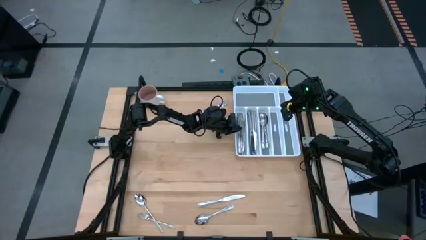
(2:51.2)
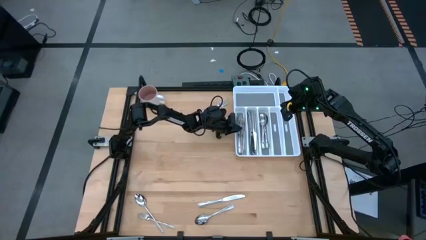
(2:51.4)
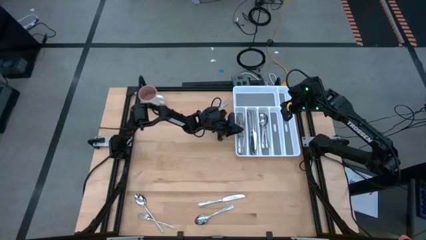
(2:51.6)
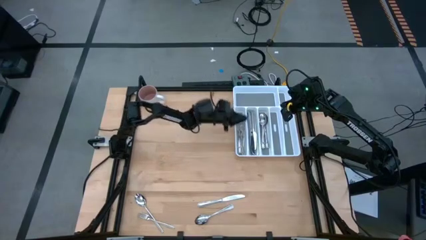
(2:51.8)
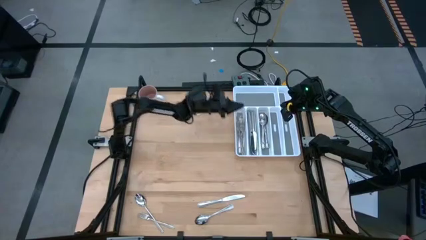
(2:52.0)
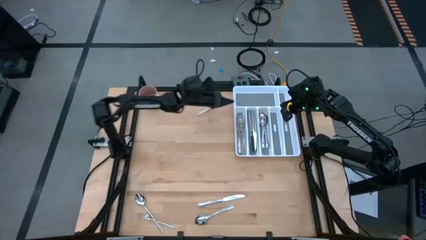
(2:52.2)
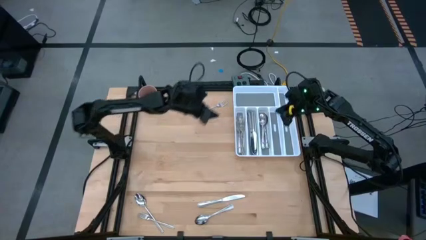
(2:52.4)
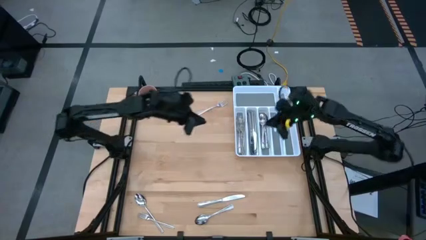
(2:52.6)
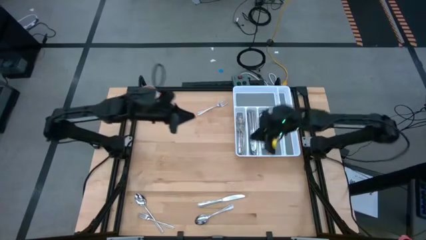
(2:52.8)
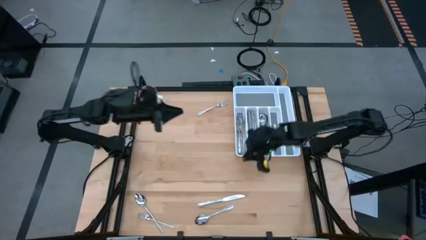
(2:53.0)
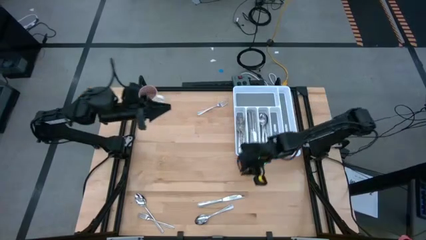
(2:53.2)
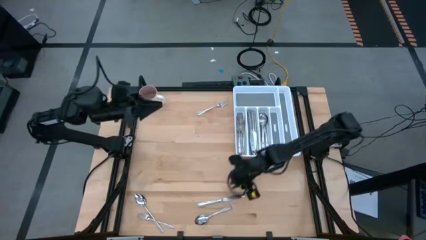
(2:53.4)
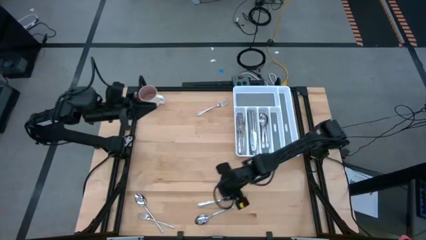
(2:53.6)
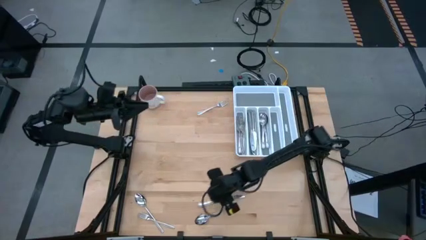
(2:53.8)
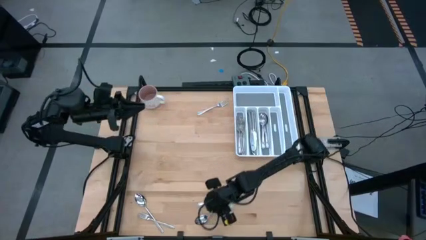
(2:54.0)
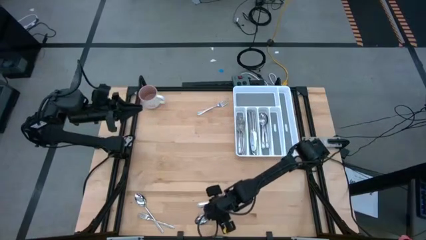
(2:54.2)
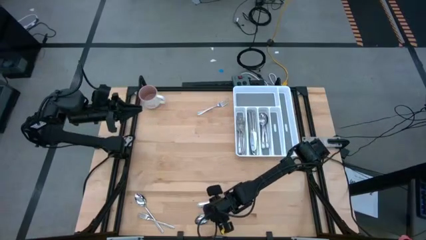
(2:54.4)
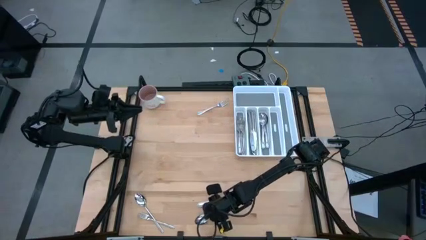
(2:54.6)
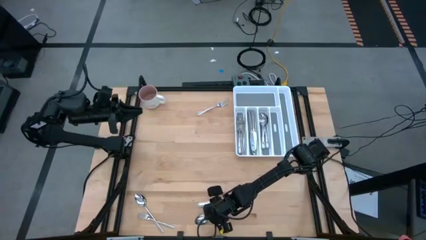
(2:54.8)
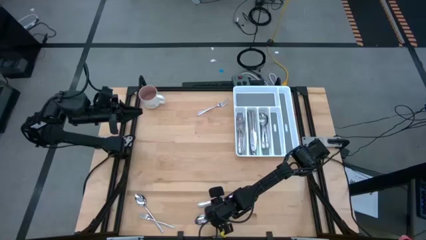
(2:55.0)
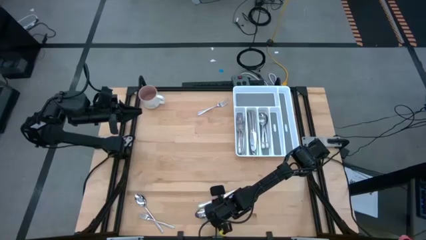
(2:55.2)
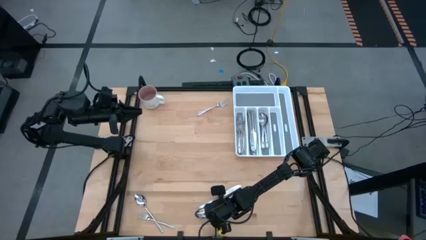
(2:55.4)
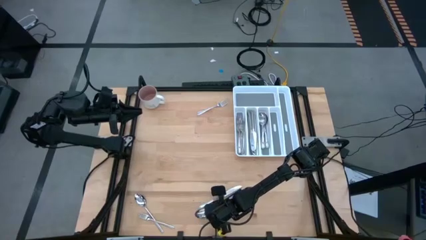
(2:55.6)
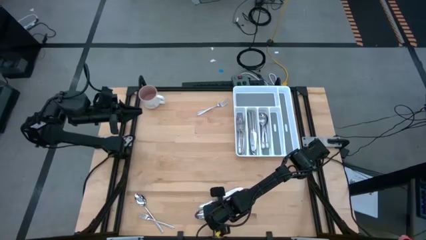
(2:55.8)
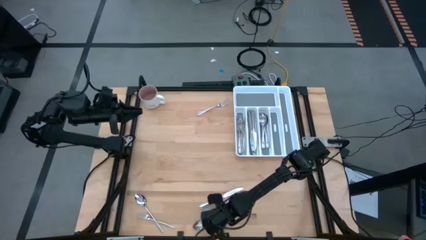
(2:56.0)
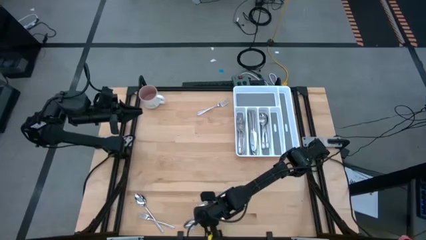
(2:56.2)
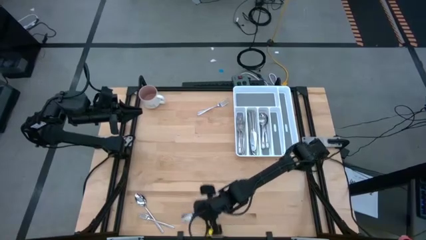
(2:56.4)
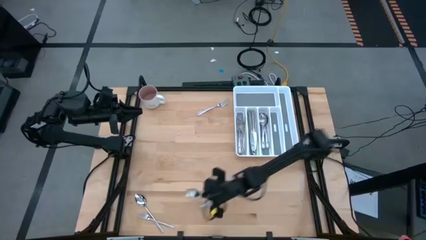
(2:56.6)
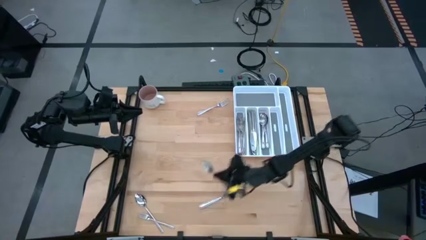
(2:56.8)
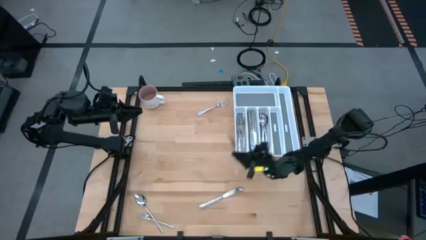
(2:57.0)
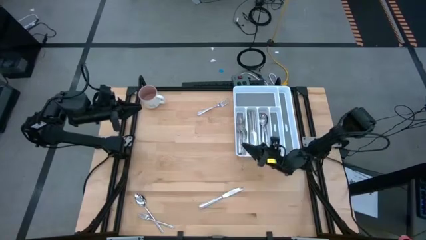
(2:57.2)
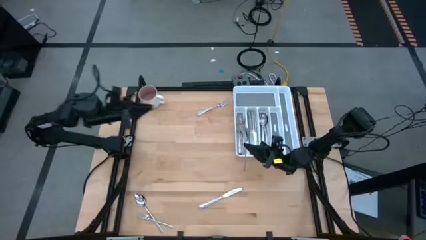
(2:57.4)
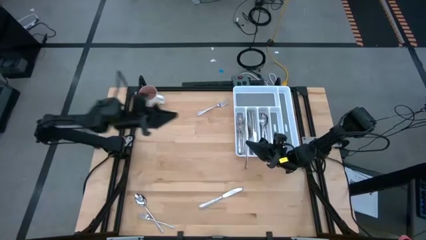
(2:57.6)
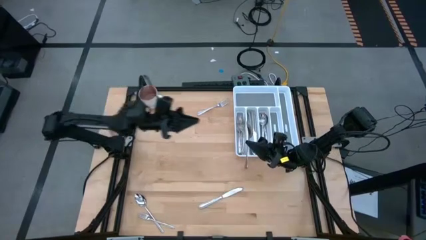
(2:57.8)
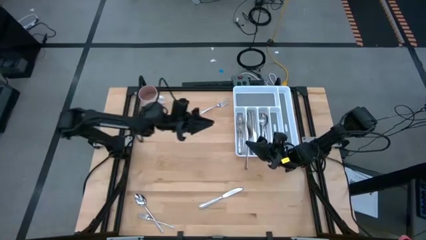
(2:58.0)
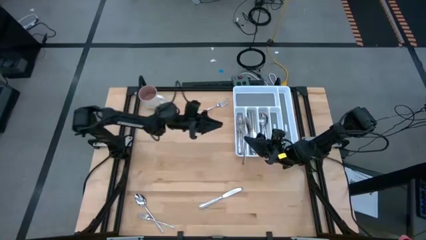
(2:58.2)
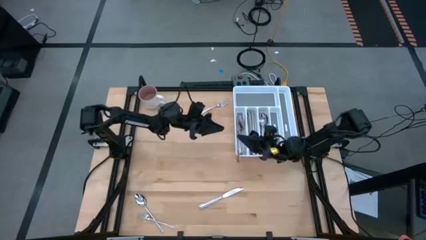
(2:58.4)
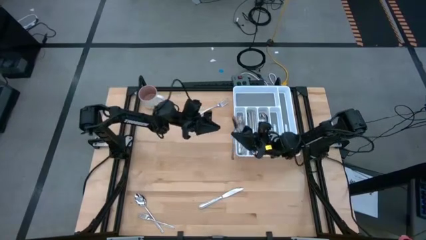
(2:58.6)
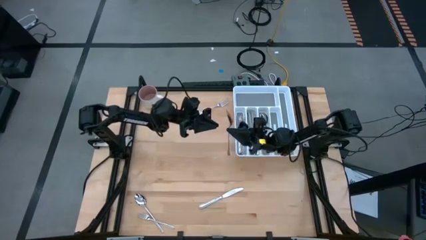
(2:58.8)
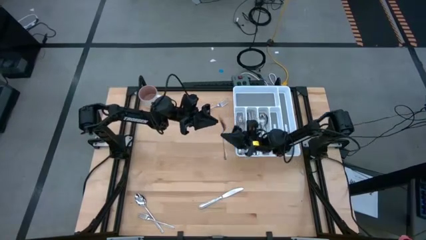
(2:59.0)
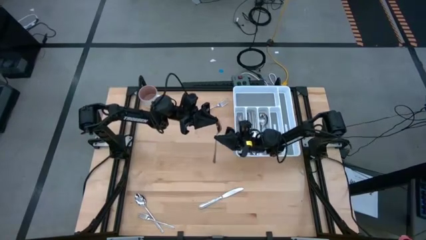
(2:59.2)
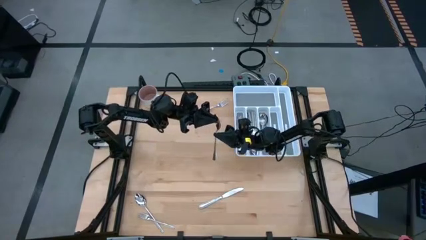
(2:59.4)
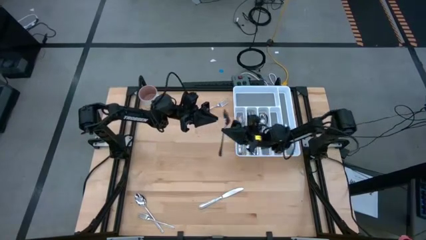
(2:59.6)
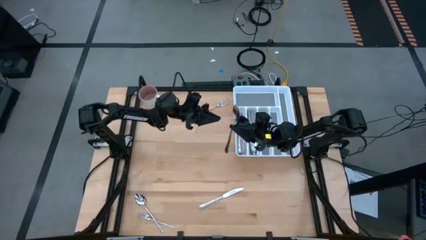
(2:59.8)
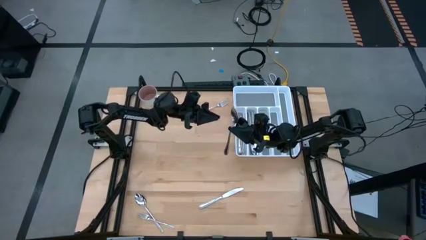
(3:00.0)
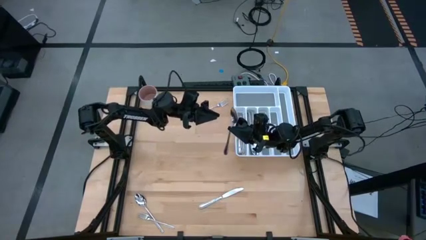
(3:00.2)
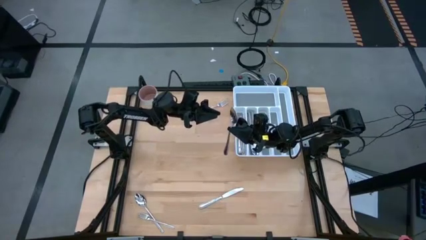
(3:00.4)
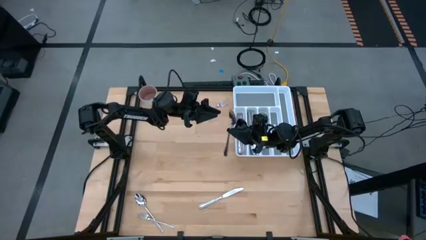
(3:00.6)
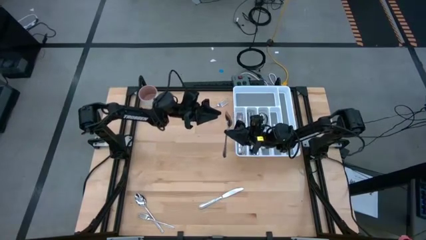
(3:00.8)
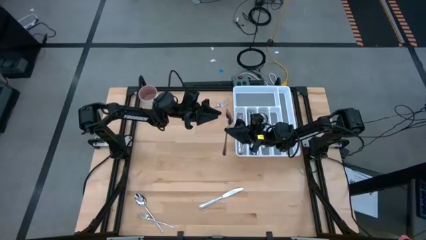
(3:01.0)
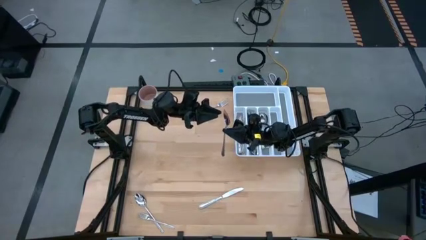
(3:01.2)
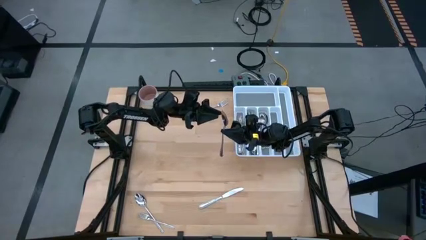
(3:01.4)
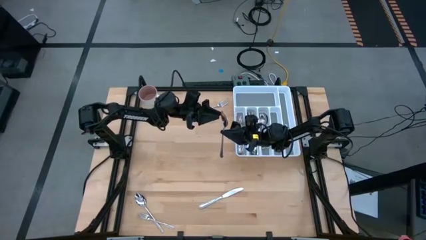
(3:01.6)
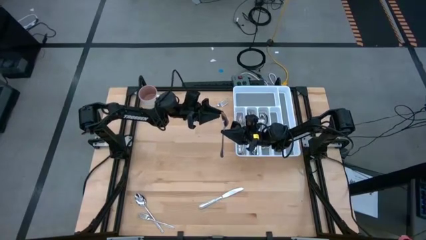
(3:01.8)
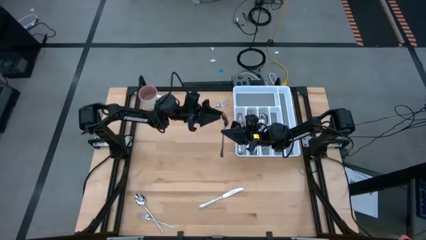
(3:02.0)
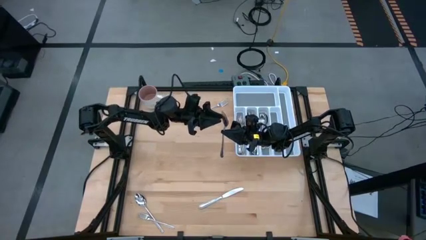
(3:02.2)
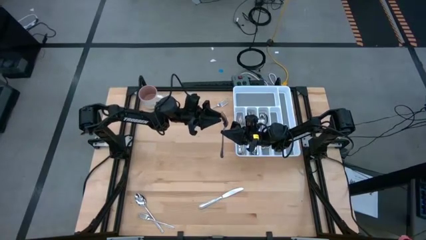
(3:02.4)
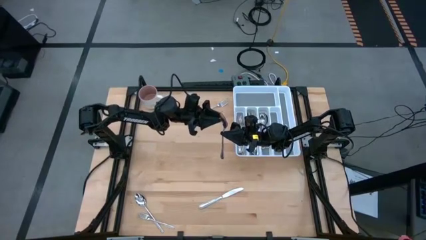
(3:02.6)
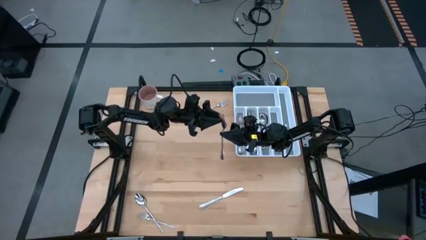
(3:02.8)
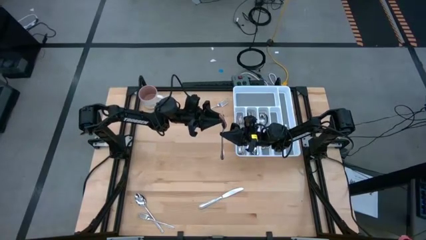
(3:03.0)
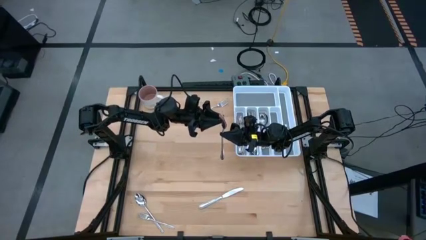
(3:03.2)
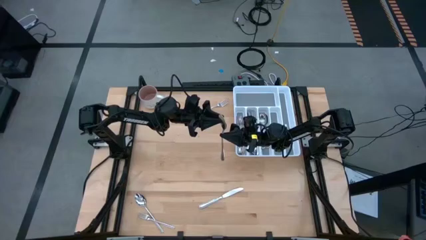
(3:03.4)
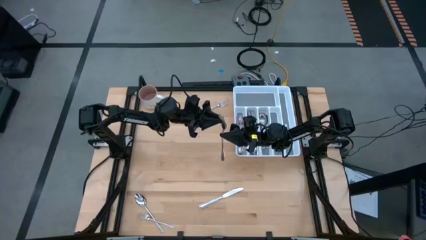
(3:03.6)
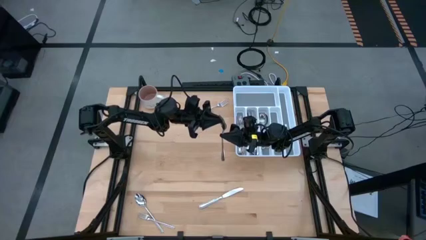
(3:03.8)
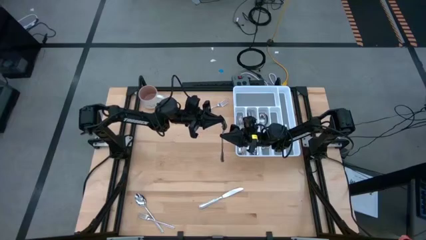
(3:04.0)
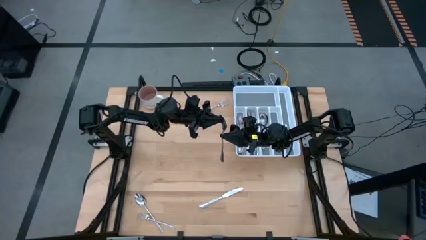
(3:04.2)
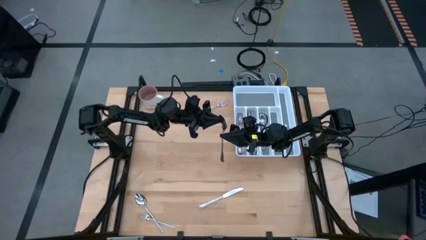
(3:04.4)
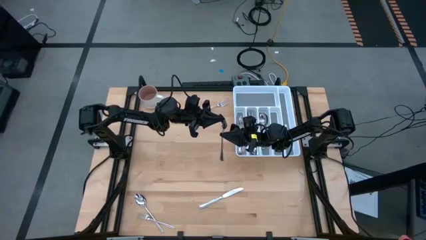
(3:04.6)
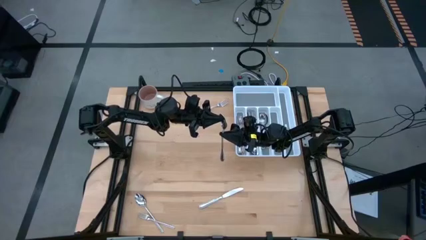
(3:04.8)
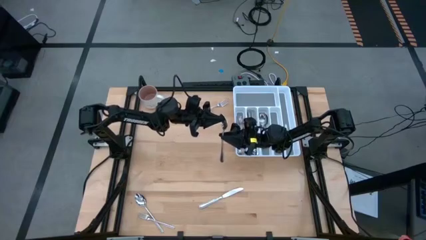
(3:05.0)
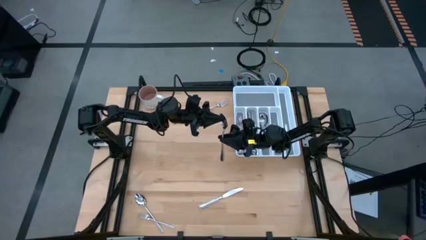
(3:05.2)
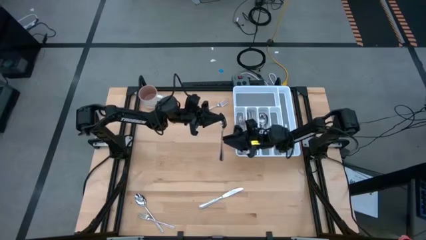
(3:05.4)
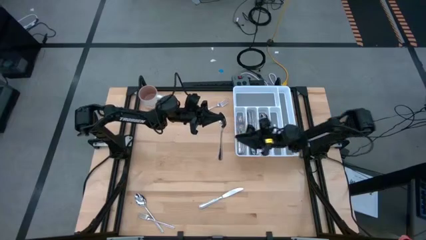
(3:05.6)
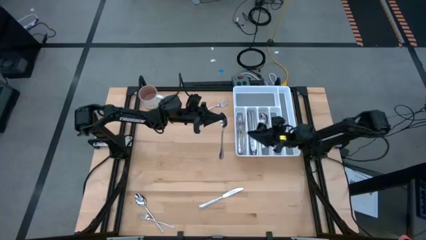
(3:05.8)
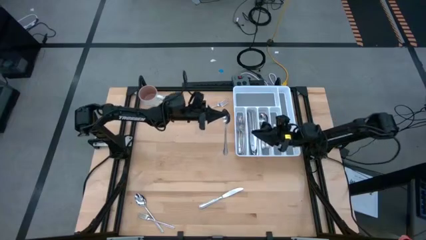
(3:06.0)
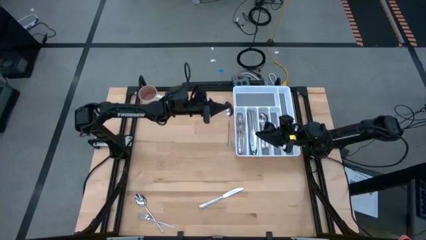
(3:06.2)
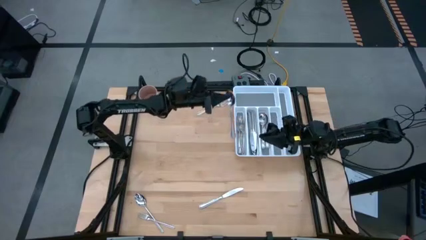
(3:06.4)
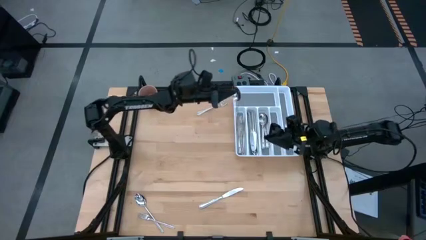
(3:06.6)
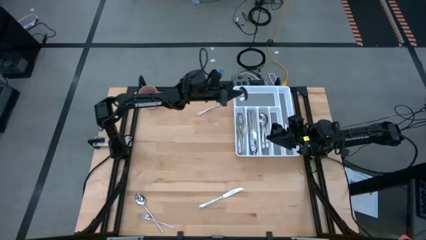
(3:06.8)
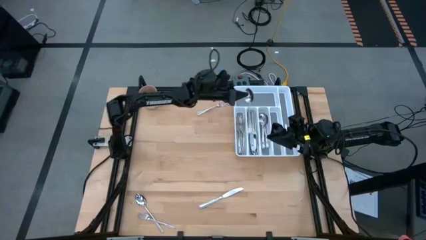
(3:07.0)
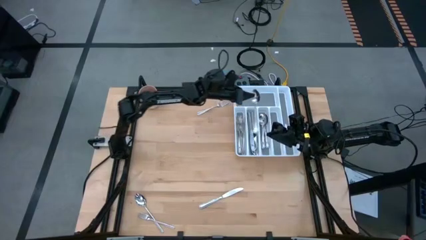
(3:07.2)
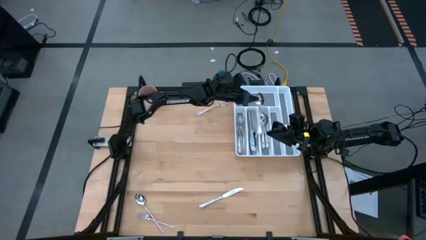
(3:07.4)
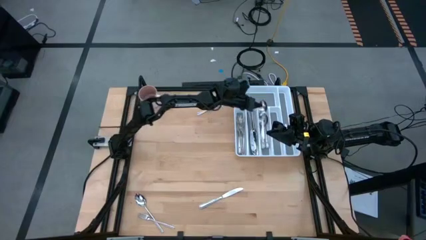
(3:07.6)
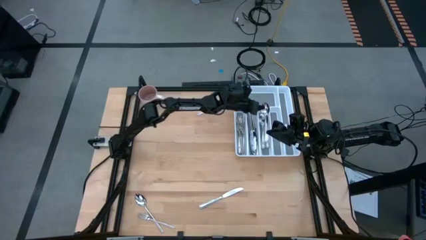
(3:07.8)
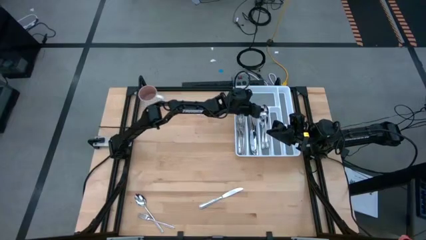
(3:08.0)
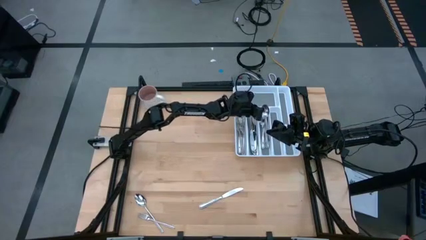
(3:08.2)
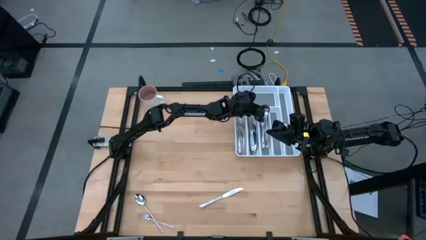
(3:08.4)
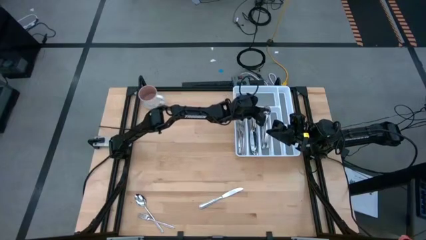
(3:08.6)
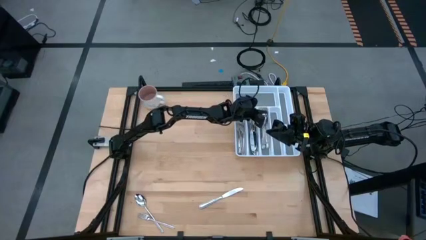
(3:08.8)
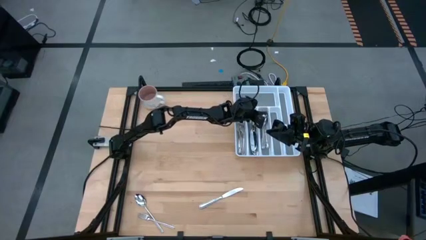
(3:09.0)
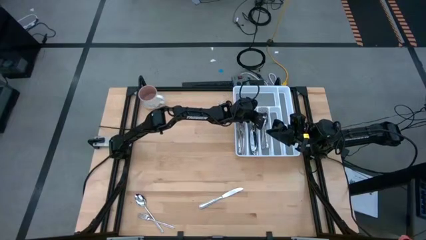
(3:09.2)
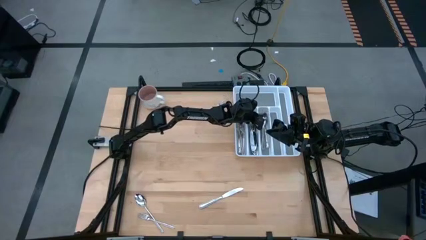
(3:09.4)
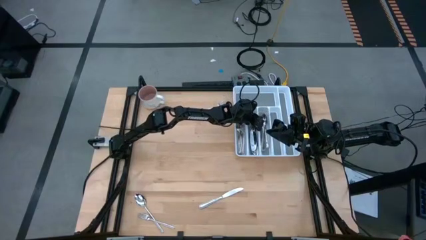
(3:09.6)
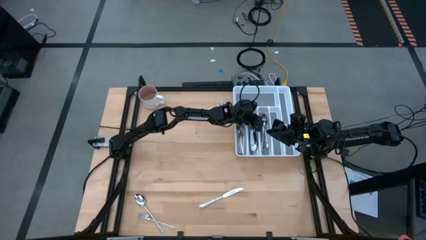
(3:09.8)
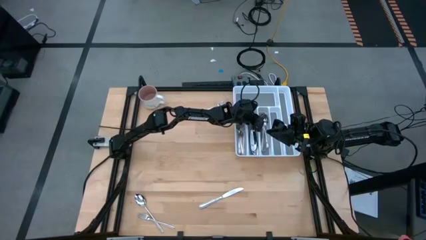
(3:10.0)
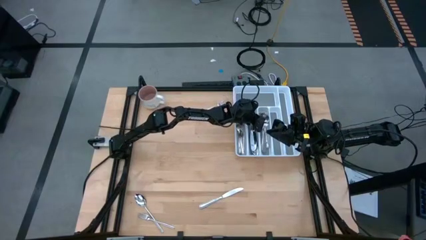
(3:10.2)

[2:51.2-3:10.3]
Task: Sort silverware
Put the silver spoon into the middle right slot of the white silverware tray
